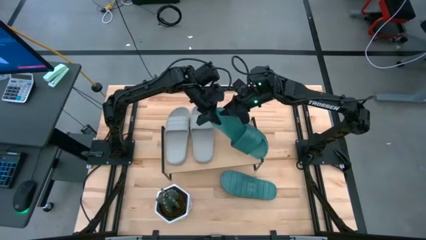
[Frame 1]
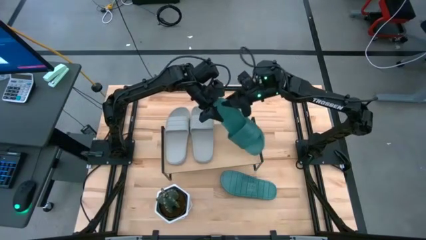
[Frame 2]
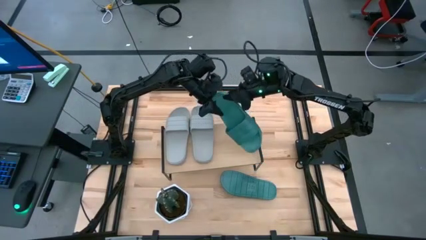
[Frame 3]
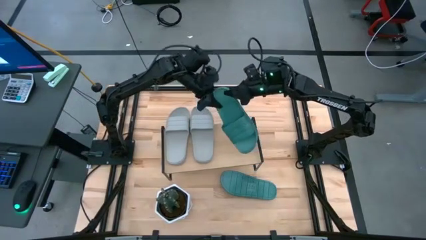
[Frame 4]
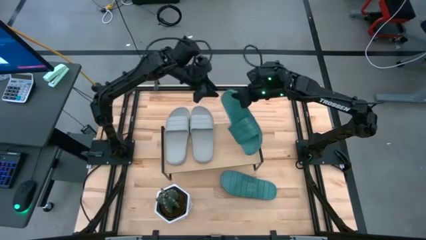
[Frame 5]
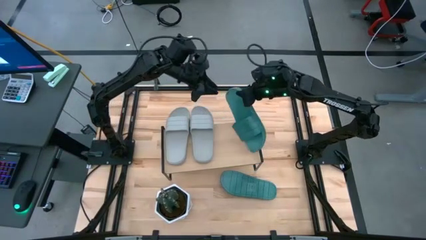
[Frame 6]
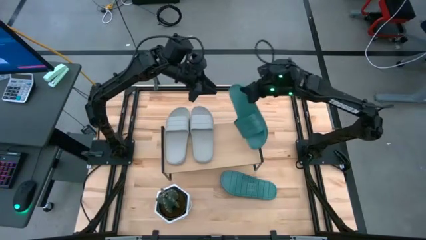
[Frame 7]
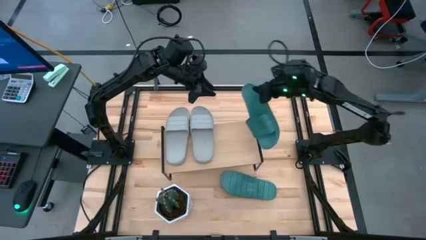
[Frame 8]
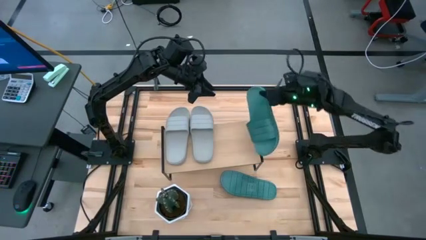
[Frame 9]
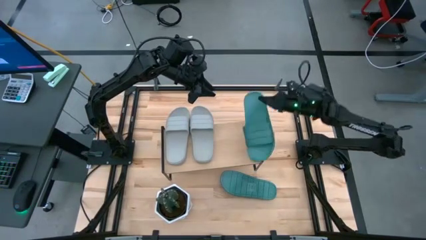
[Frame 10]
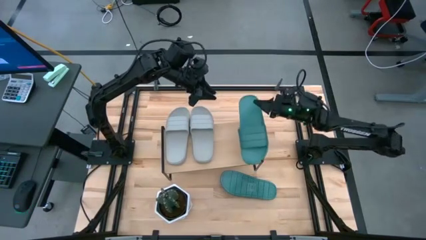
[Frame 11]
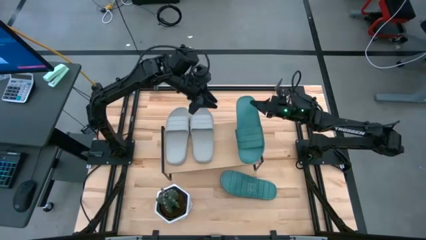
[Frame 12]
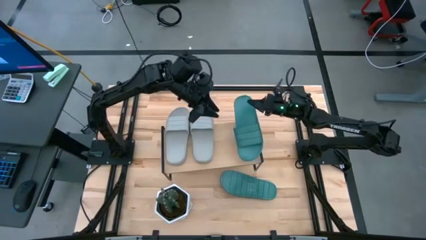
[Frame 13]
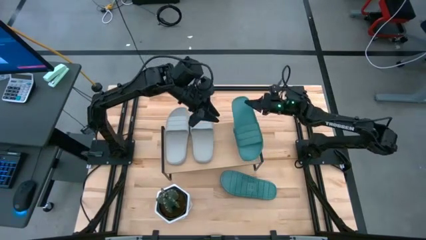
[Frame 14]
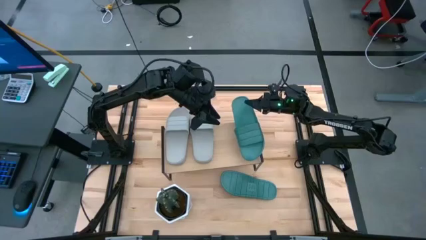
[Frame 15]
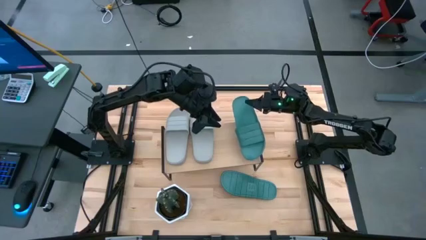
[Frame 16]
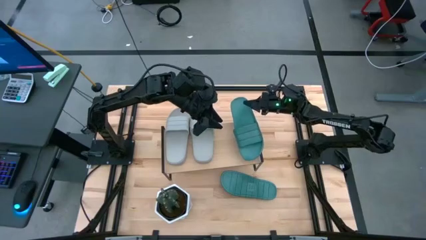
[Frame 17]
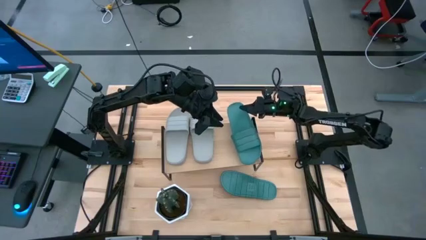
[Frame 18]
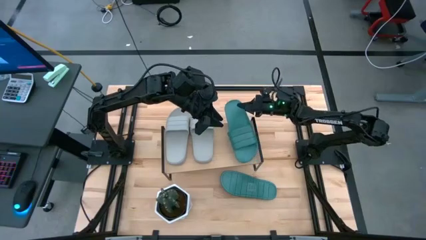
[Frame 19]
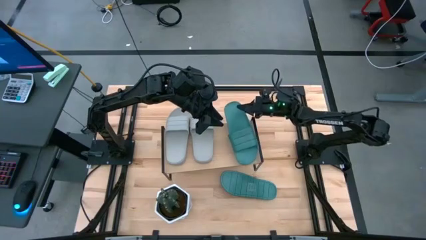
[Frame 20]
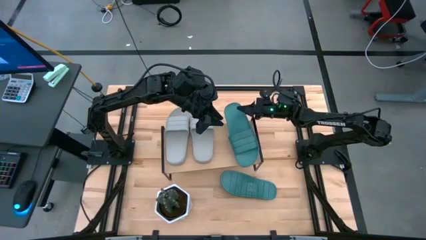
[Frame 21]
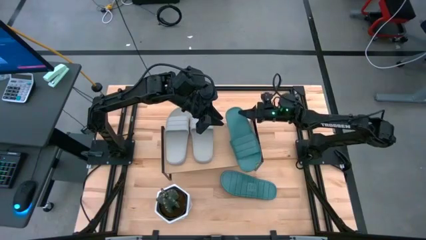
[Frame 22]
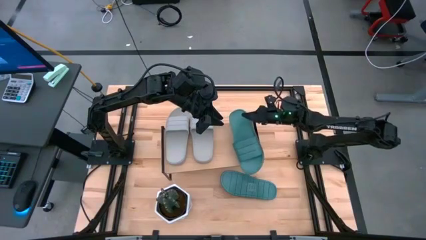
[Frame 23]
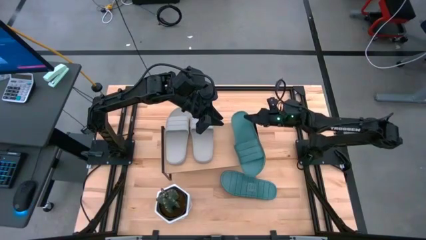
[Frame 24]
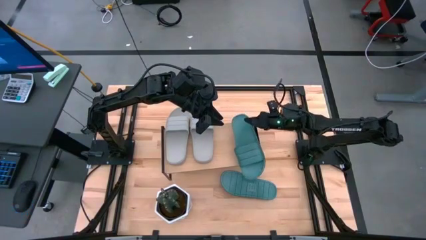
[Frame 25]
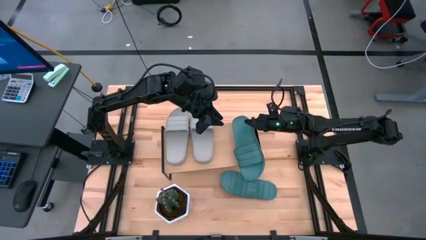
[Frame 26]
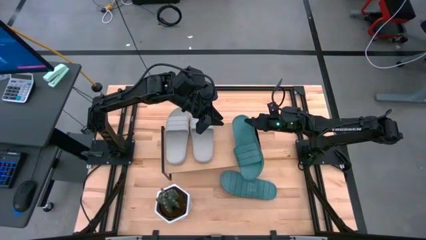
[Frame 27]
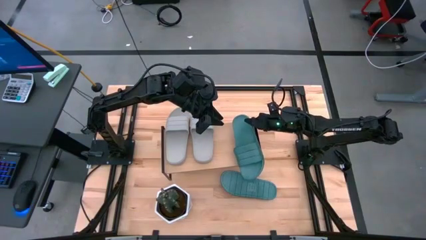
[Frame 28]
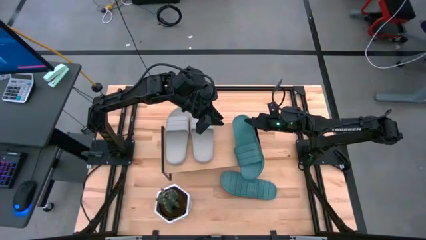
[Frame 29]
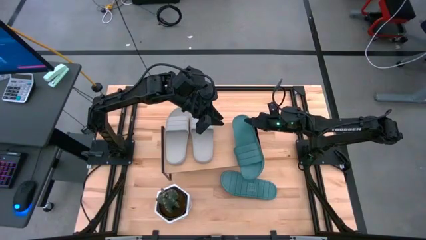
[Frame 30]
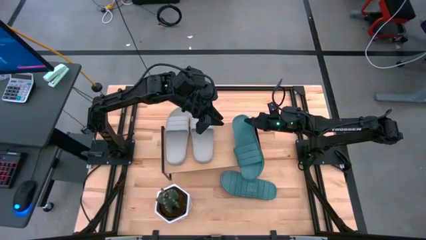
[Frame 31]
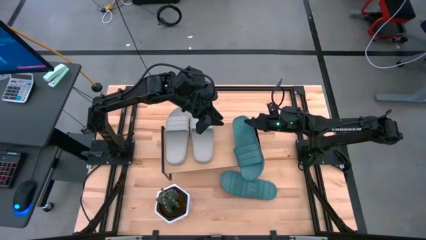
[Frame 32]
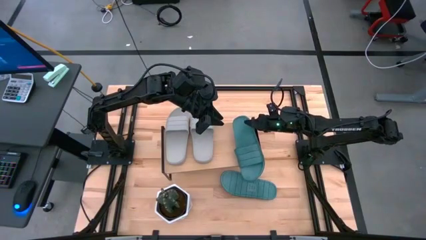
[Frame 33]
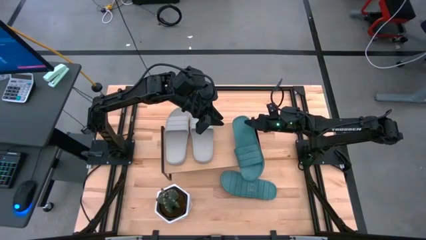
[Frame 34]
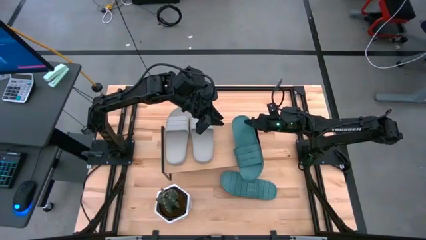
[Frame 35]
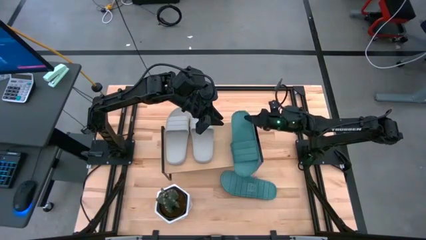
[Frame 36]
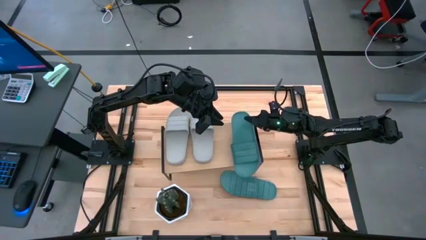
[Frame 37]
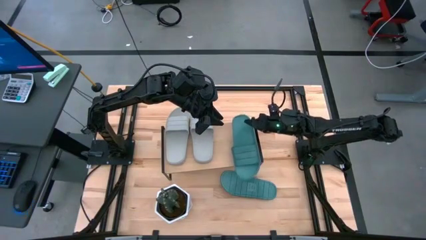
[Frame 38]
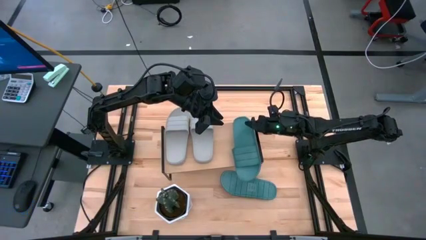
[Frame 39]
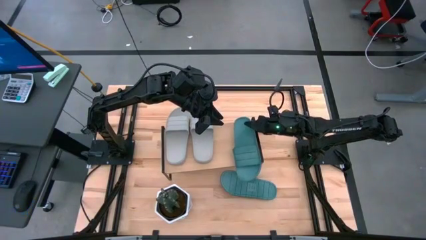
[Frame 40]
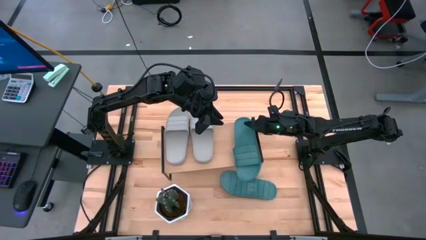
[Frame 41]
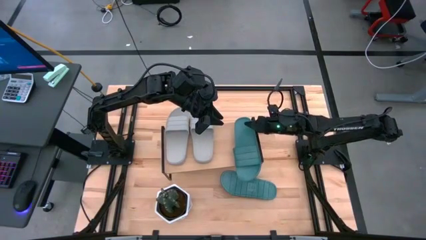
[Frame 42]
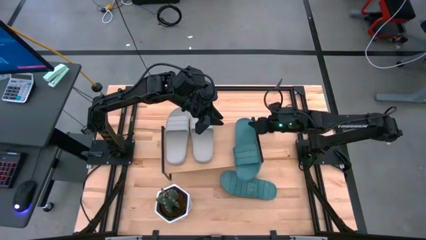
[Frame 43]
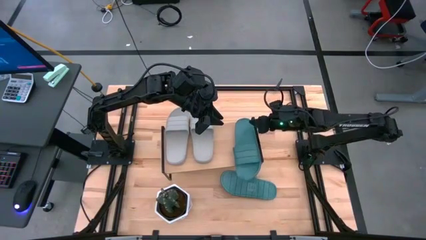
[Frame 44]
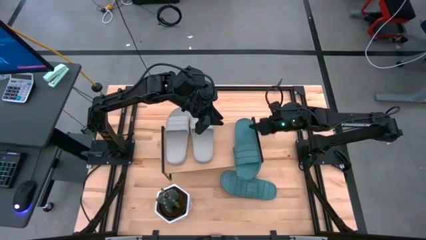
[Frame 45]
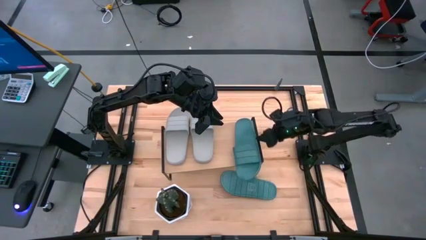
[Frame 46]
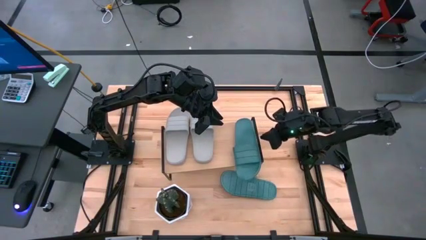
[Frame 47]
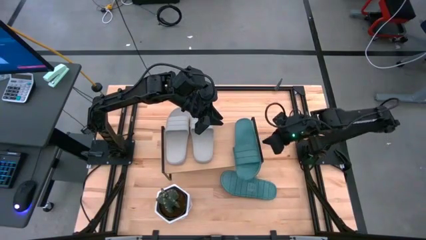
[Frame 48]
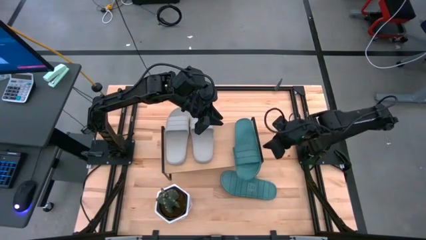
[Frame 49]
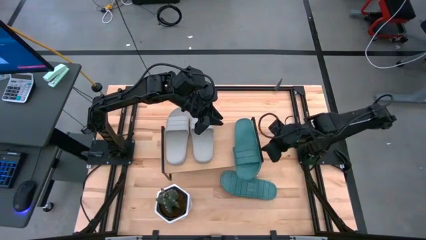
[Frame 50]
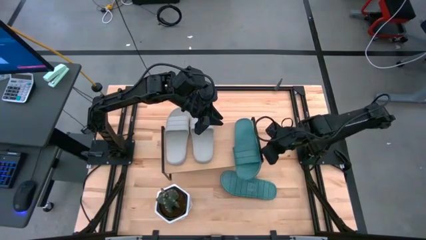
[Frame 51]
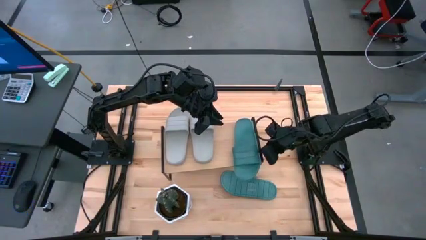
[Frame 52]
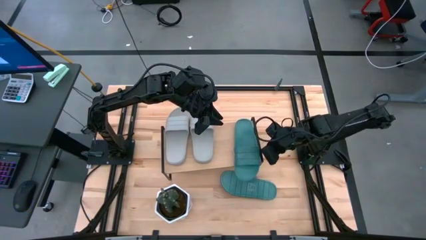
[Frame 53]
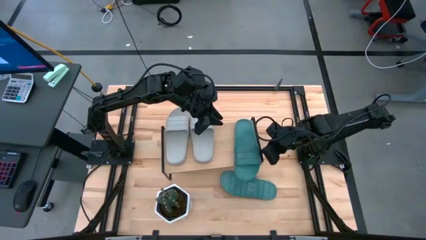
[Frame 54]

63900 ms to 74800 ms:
Task: Pick and place slides into the shelf
Put the top green slide on the shelf
